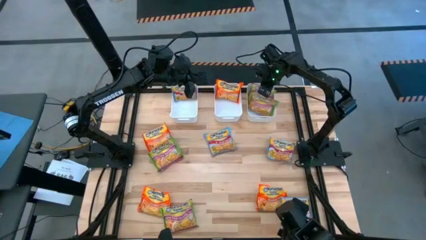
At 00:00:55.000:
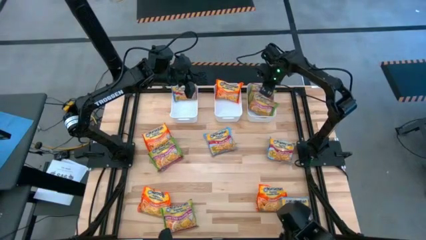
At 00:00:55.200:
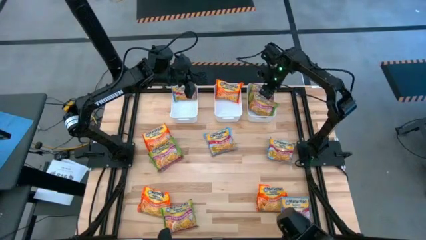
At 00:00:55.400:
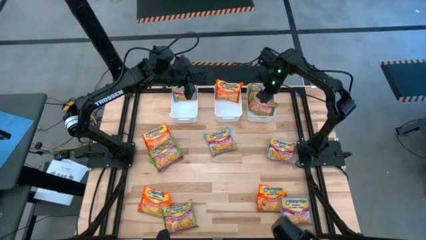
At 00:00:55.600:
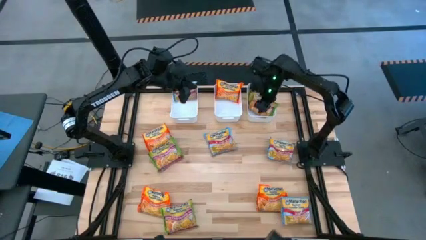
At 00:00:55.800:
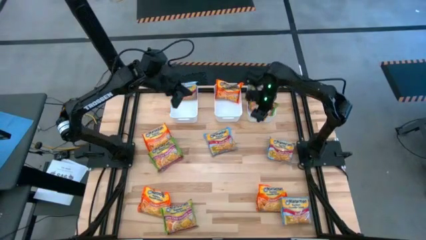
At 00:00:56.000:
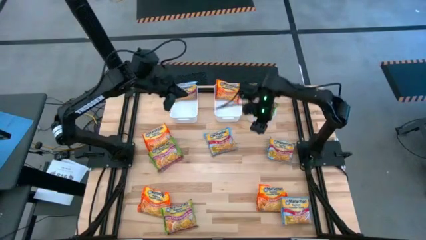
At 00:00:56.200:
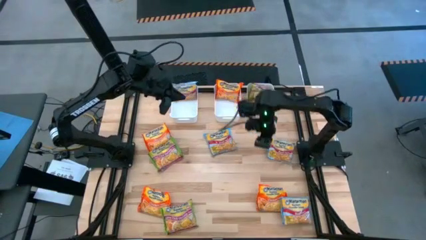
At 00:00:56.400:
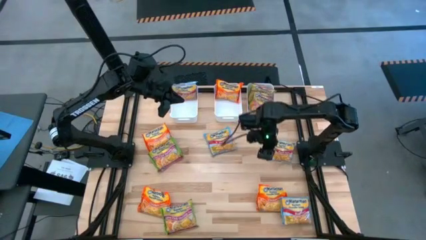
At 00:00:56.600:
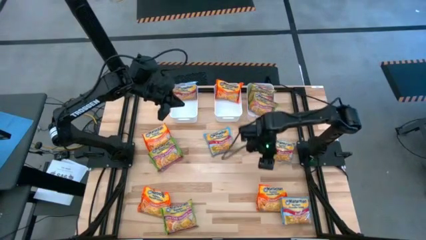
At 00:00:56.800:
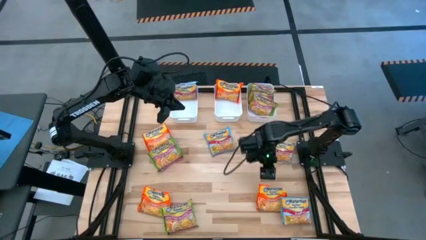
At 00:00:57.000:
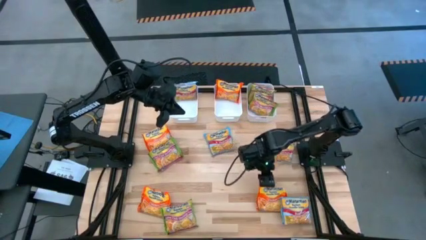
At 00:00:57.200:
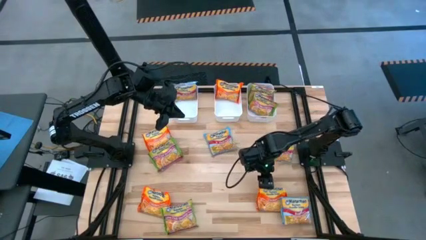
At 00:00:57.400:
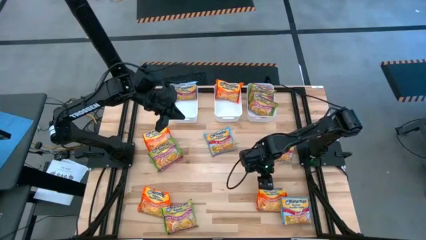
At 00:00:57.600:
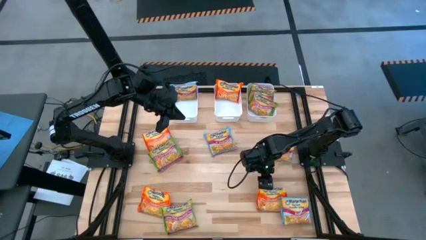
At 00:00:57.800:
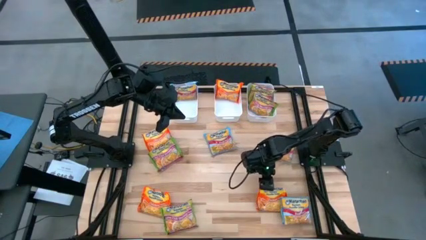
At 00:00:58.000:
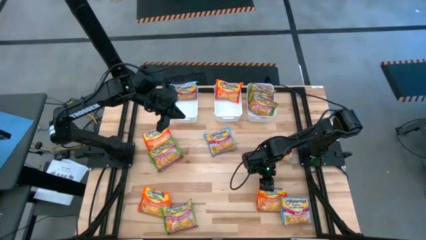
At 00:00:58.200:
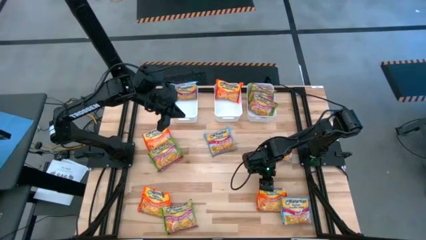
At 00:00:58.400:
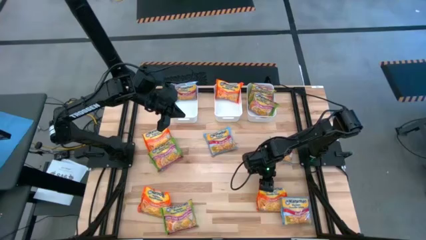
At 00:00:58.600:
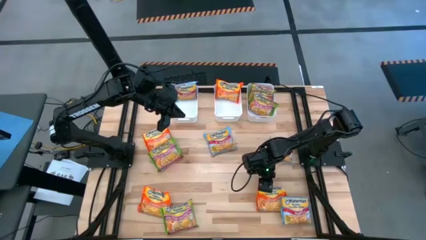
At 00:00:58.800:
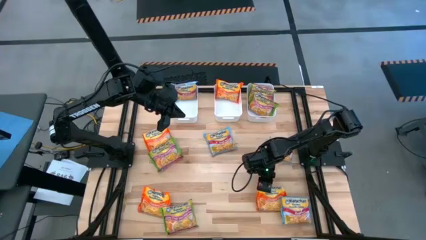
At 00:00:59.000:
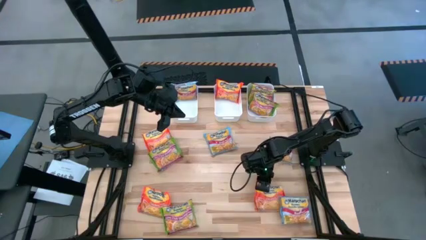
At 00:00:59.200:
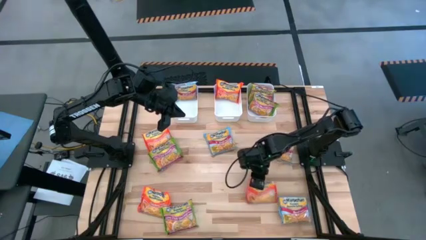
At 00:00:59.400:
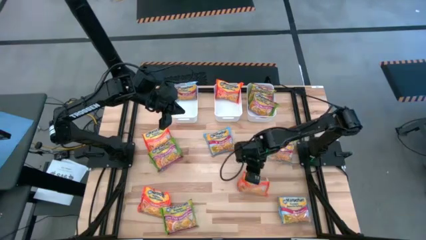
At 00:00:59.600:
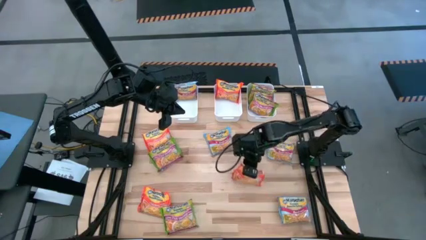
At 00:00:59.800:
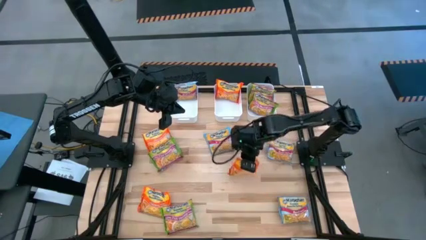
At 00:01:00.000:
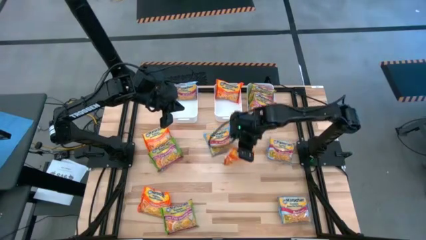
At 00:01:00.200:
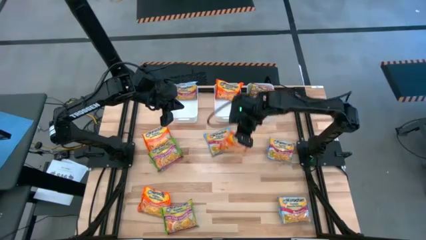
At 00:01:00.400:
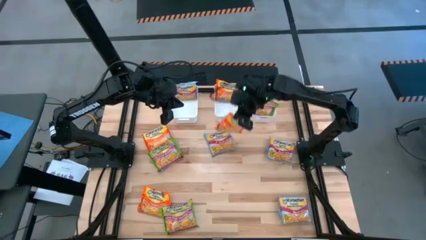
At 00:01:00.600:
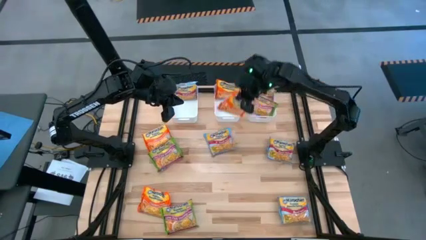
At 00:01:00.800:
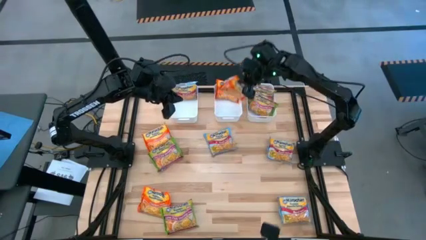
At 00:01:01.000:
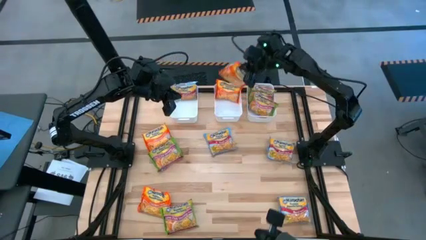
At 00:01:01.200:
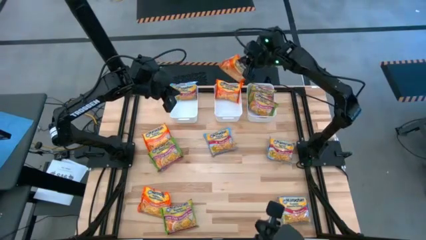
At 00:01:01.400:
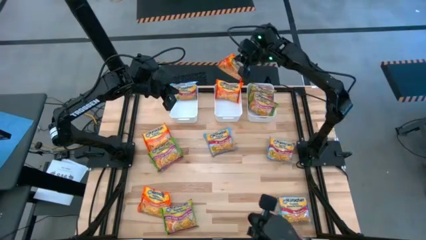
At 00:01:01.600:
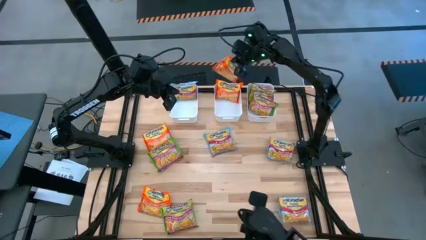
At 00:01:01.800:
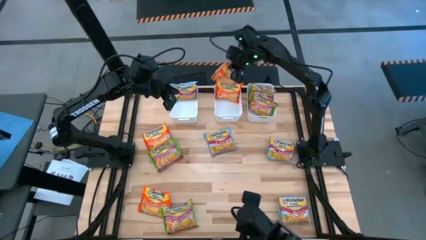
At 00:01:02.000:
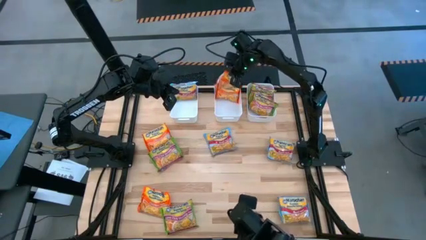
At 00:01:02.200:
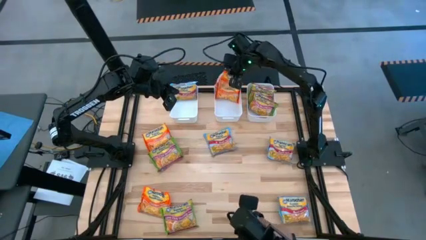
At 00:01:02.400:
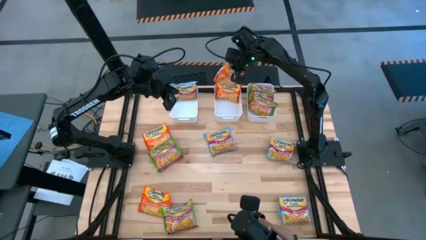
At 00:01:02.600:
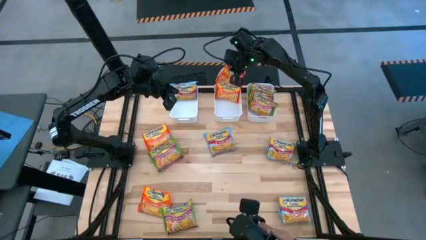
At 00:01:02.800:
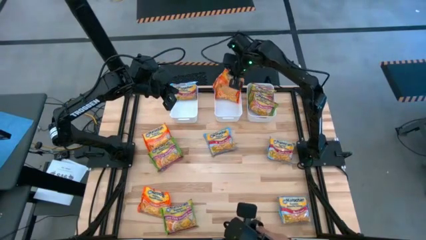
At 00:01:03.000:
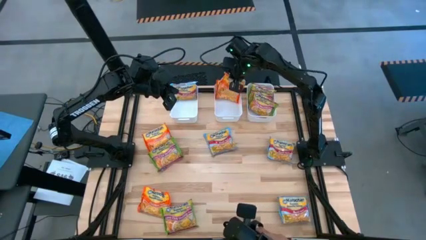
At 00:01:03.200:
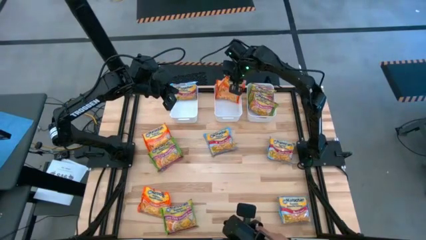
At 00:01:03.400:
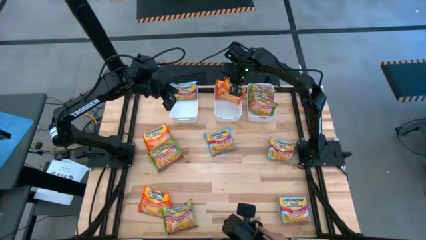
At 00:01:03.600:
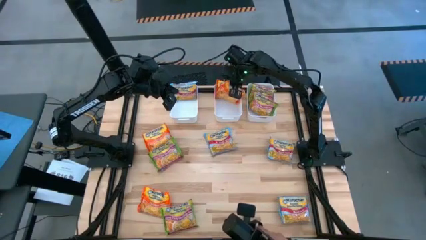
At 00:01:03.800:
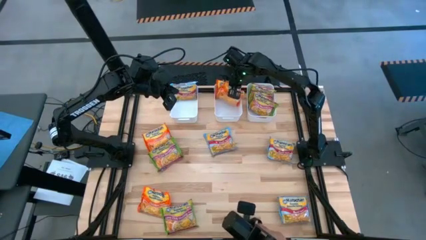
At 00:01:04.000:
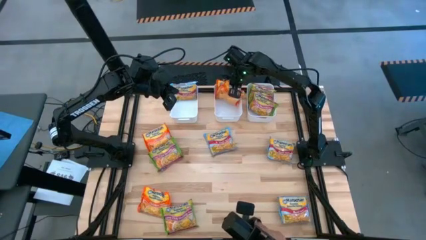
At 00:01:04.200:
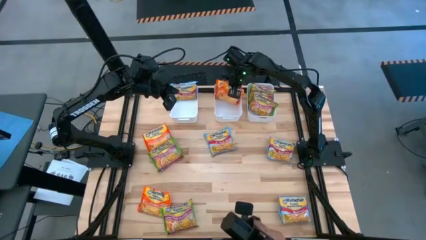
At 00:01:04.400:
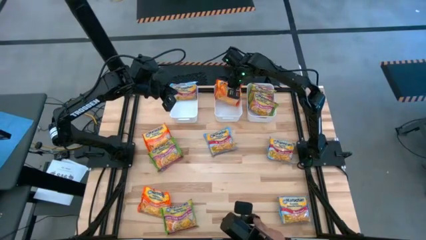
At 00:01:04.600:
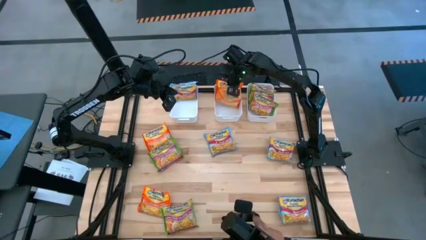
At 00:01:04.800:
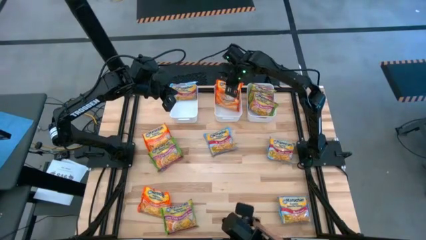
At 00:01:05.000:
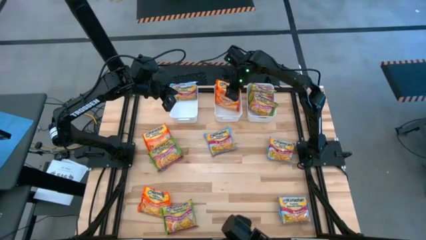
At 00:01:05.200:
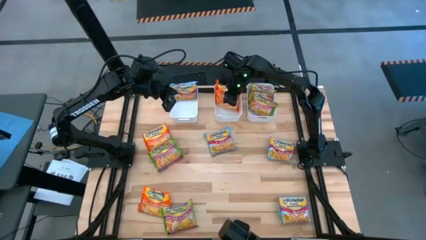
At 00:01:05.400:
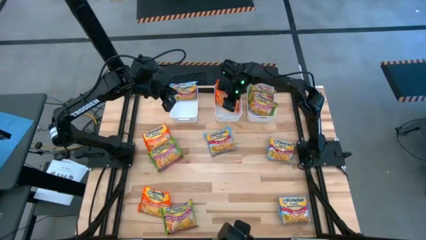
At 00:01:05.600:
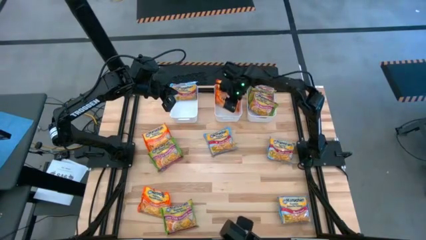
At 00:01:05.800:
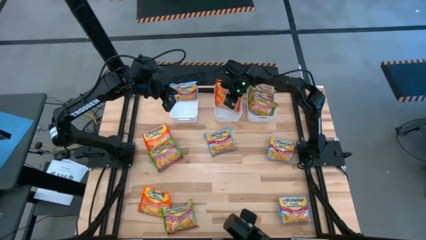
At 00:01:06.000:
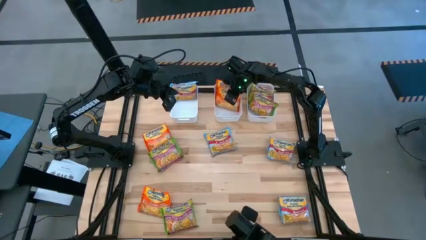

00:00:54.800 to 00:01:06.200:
Task: Sort Maruchan noodles
Put the orange noodle pack into the middle white bin
